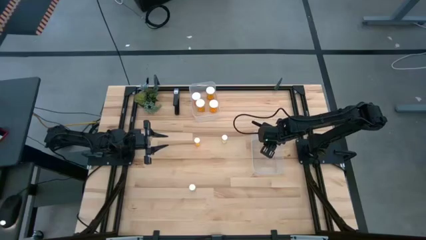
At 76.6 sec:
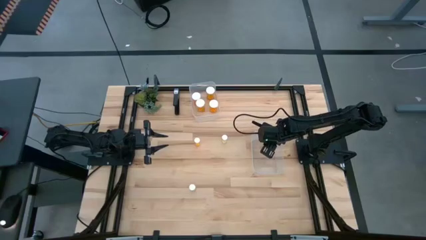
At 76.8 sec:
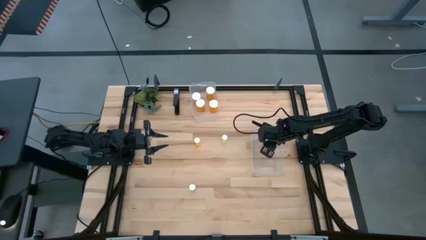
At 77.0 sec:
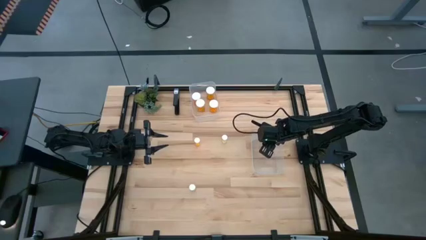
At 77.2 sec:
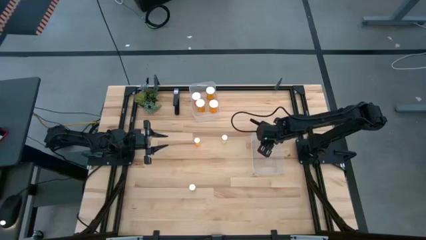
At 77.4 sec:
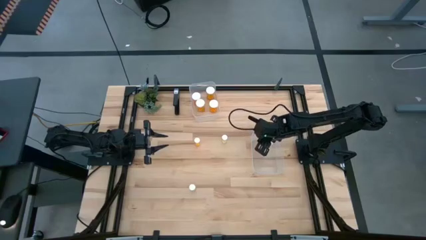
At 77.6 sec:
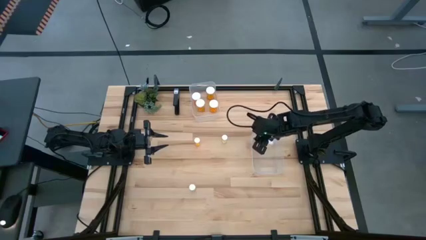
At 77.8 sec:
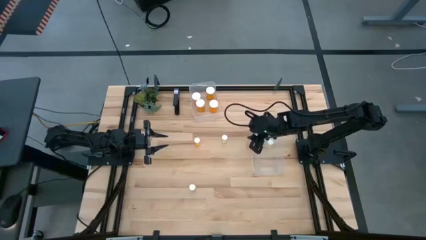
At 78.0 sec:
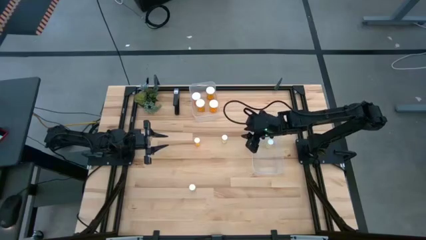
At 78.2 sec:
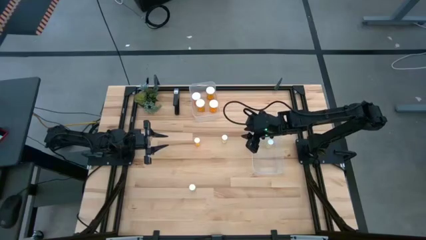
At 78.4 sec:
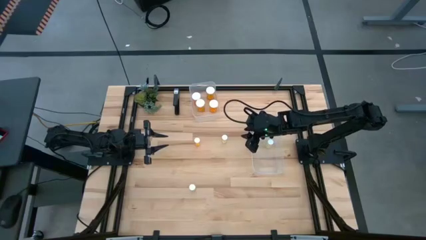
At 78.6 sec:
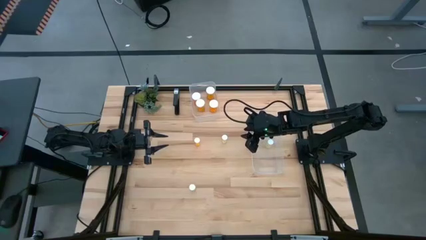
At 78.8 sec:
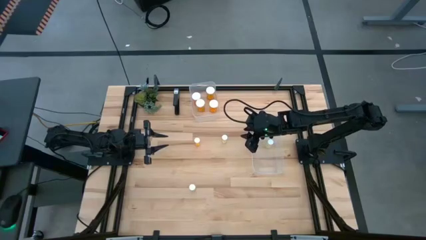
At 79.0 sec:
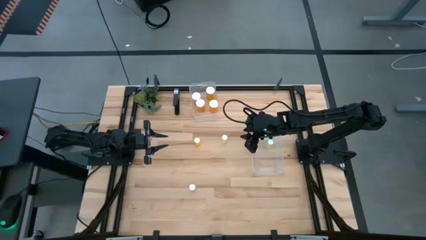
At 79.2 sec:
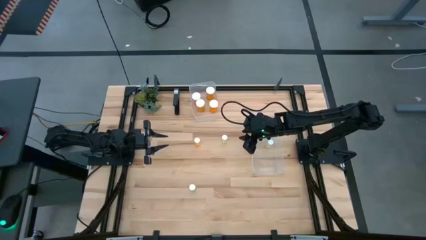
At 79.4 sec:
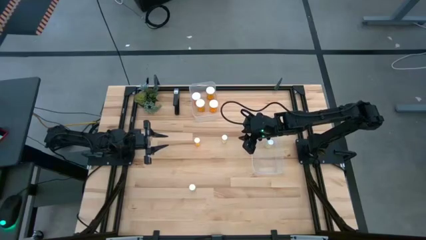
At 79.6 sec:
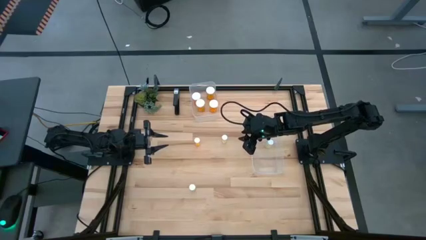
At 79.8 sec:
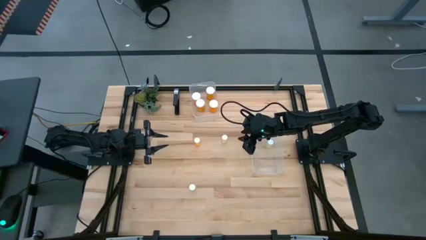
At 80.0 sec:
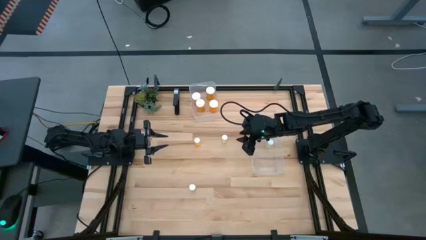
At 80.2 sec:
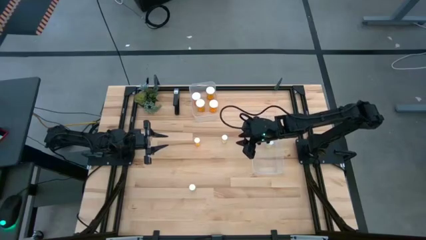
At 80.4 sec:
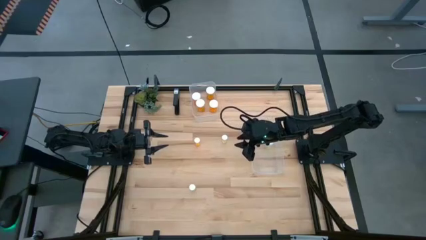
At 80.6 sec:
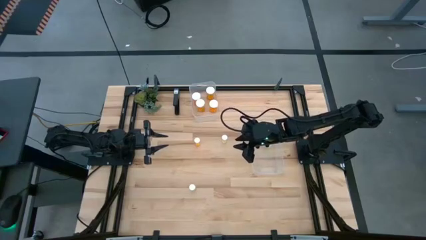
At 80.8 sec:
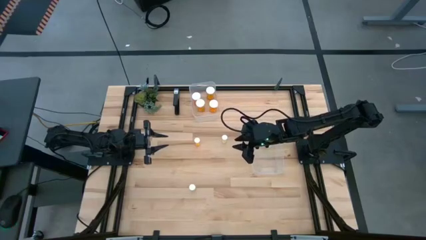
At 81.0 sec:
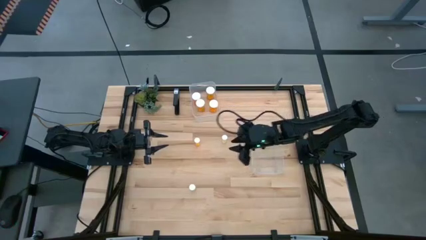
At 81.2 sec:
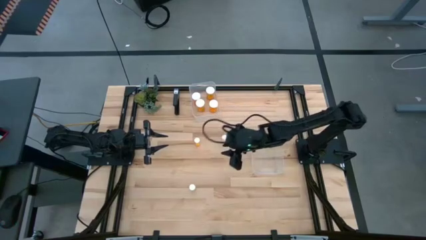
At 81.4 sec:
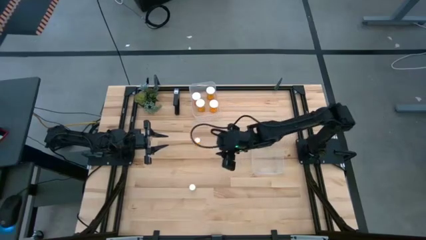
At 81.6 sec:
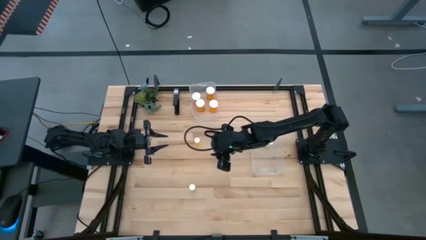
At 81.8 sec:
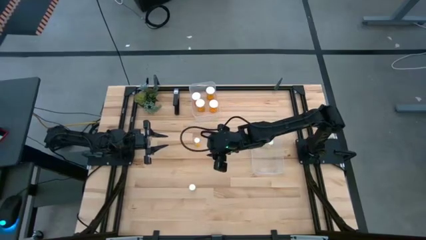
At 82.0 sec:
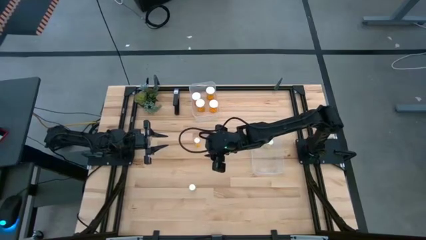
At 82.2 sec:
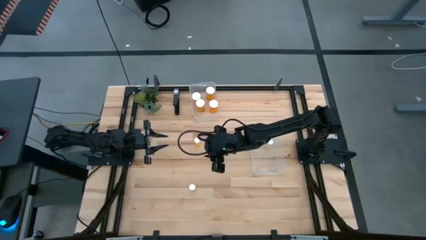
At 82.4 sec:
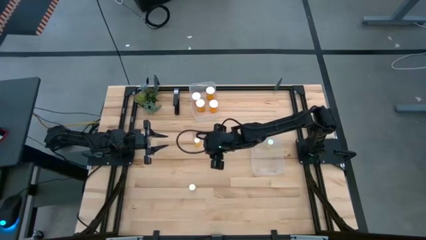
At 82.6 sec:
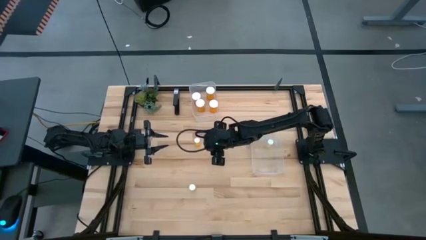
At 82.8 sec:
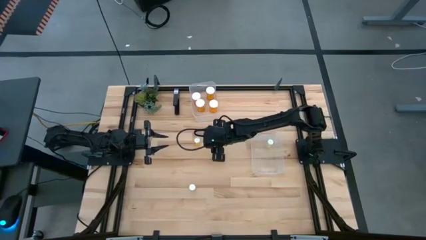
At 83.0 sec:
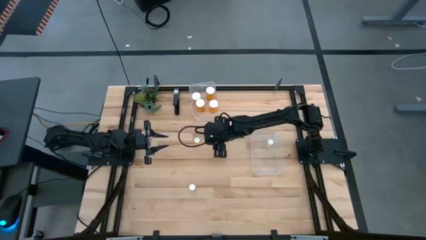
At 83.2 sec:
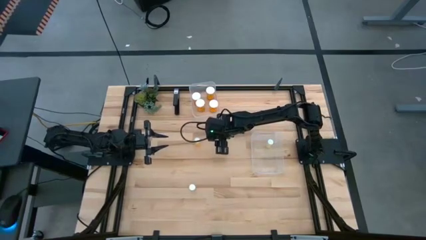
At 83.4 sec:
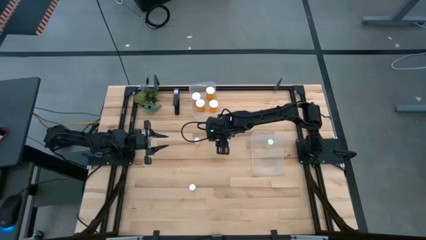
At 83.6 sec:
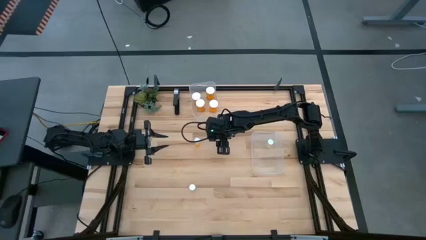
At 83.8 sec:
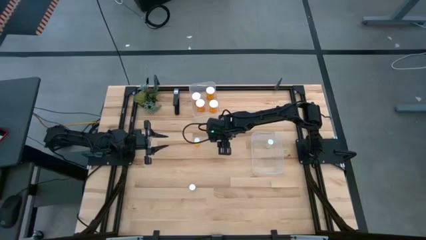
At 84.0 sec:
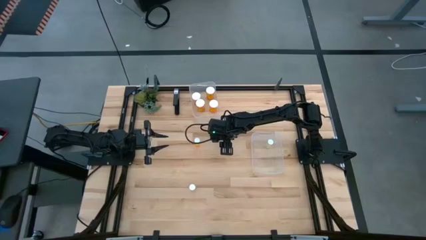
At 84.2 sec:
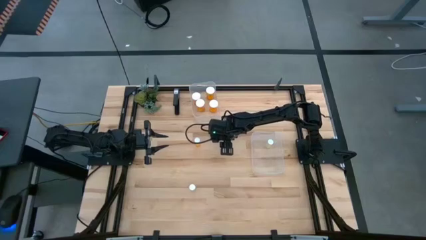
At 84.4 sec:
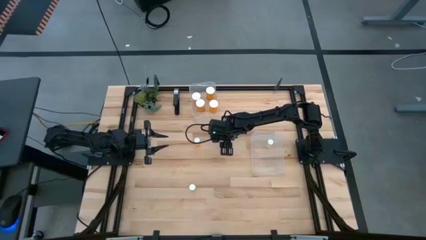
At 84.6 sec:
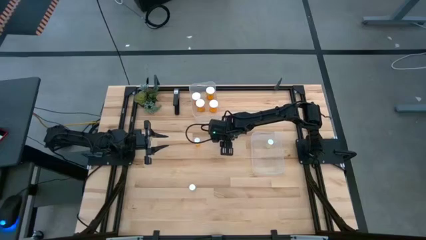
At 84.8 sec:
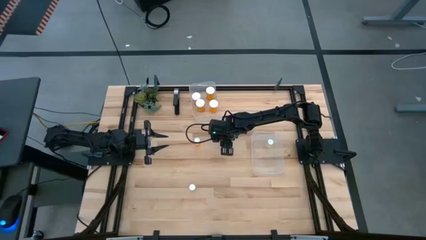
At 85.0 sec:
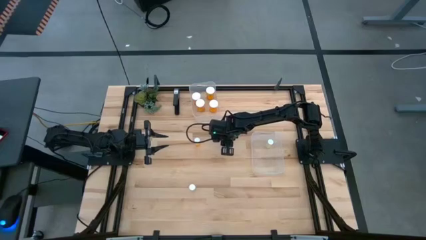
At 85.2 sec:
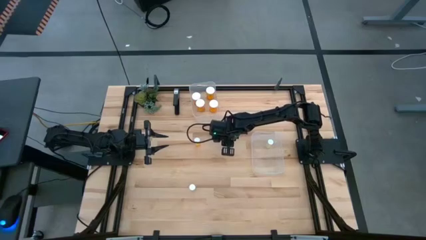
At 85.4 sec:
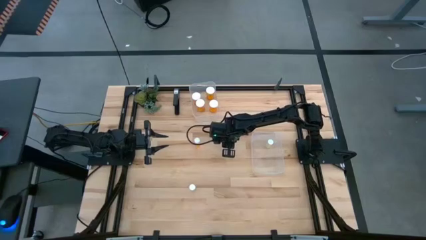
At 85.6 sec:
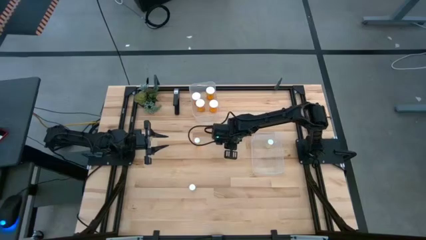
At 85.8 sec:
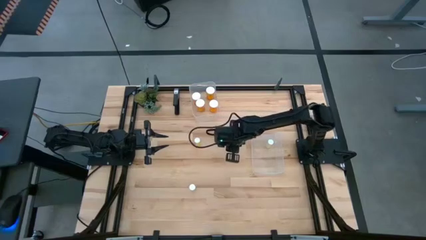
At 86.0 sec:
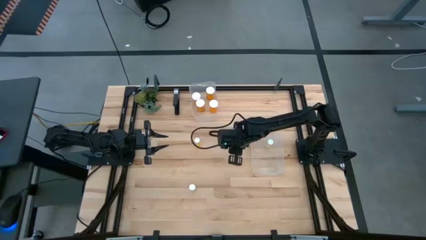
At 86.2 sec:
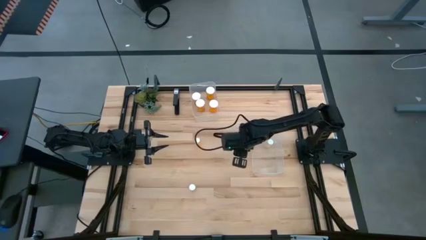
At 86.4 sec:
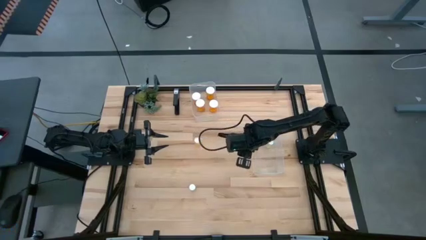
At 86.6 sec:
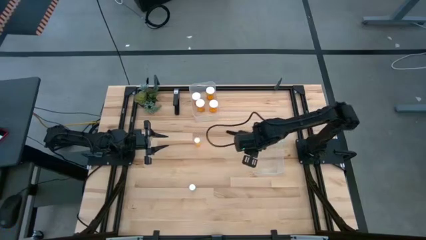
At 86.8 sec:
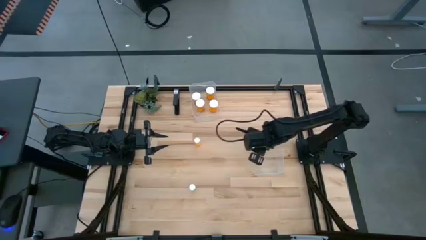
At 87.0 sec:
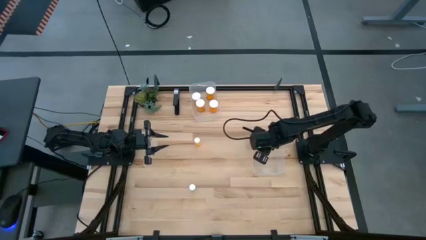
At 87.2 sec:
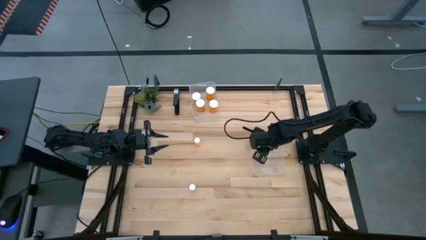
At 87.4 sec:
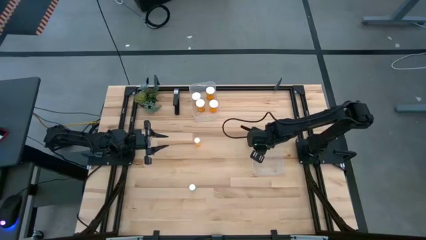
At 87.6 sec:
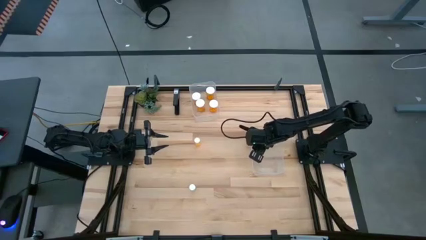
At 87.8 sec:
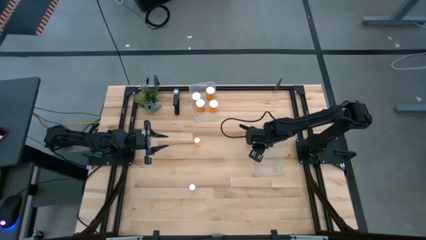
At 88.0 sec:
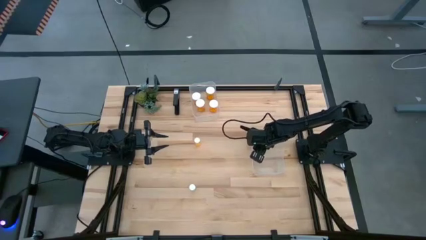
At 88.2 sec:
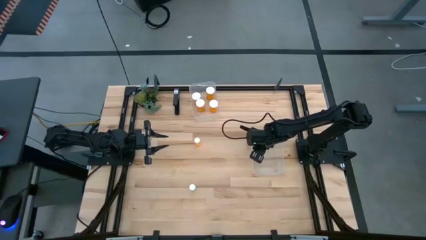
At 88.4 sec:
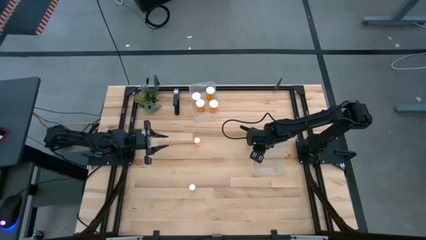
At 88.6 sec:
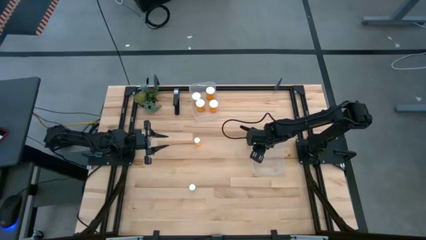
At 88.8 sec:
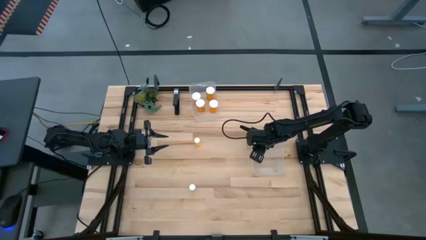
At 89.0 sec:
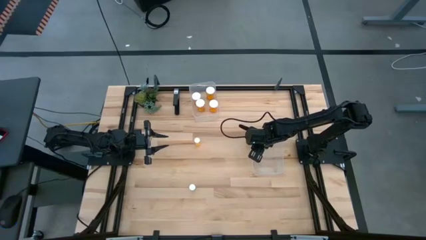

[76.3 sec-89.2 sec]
Task: Pick and place medicine bottles into bin by pill shape (circle, oval)
Put the yellow tablet bottle into the bottom transparent bin
